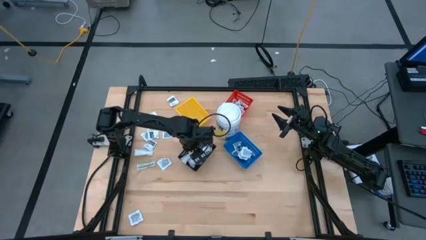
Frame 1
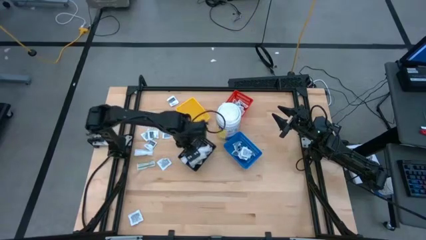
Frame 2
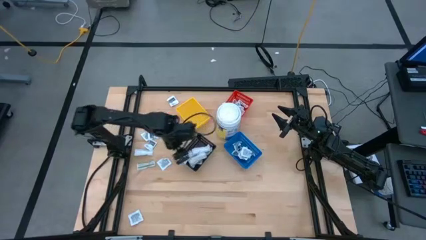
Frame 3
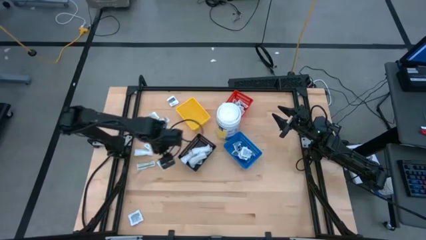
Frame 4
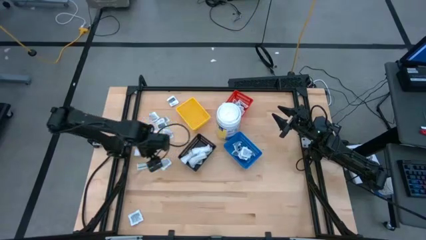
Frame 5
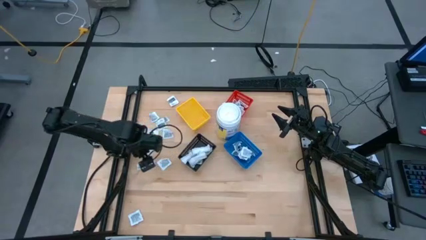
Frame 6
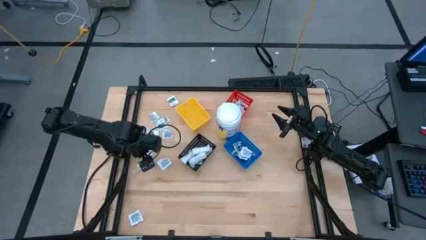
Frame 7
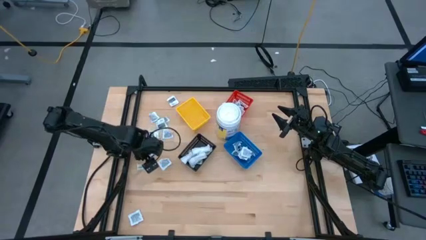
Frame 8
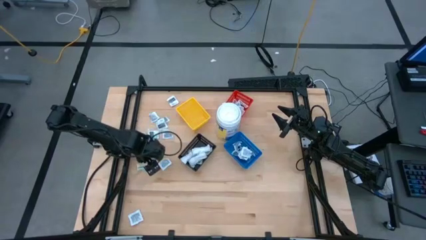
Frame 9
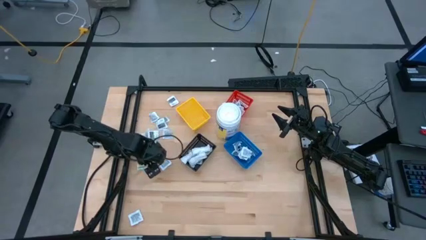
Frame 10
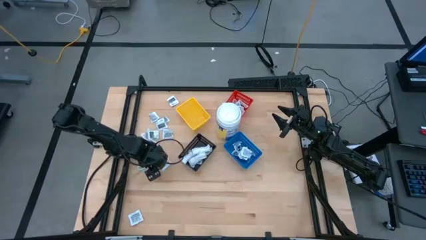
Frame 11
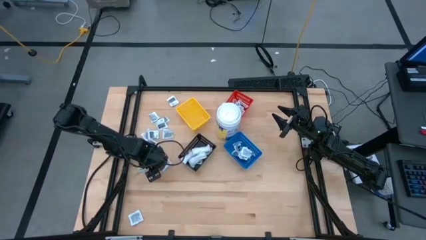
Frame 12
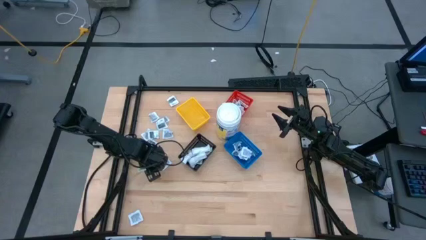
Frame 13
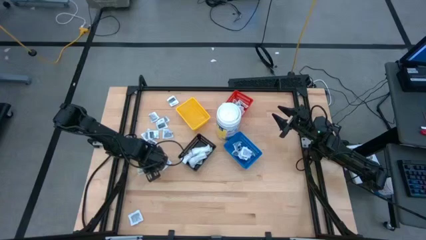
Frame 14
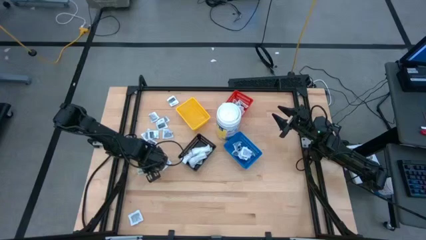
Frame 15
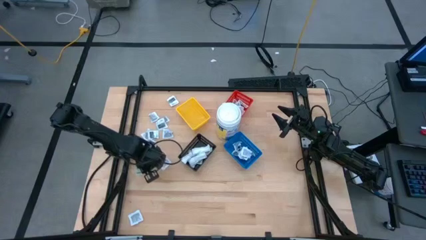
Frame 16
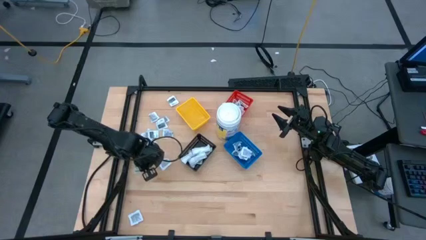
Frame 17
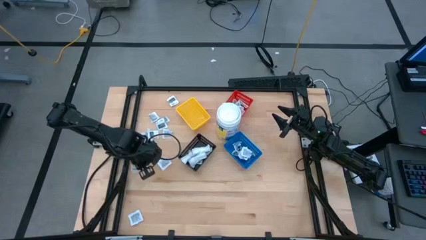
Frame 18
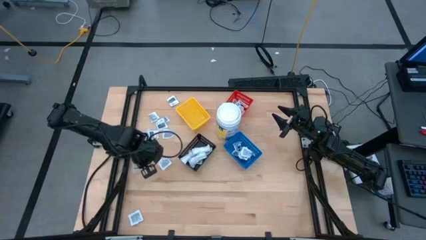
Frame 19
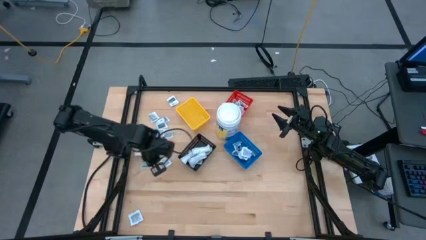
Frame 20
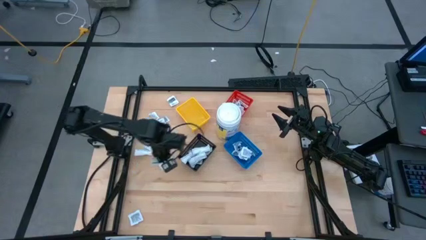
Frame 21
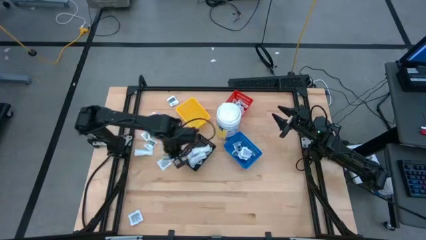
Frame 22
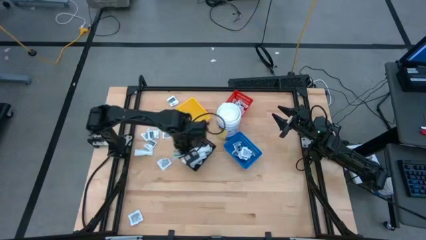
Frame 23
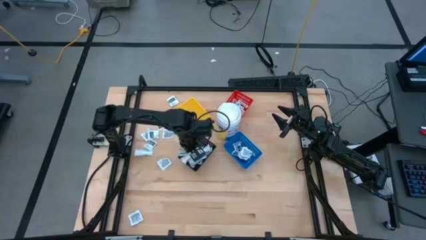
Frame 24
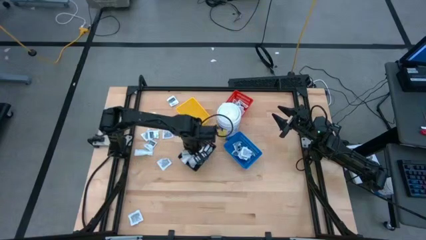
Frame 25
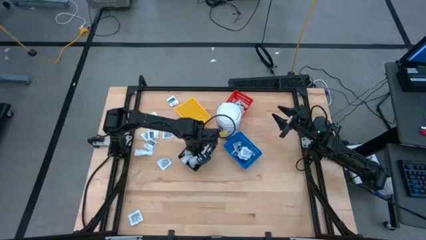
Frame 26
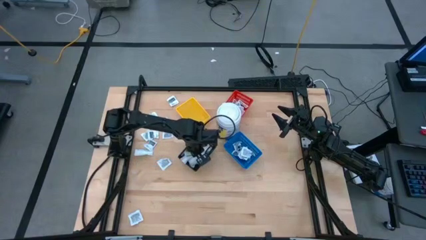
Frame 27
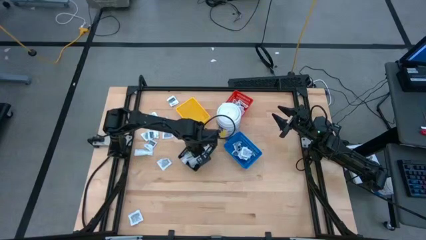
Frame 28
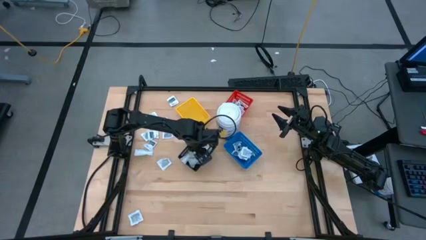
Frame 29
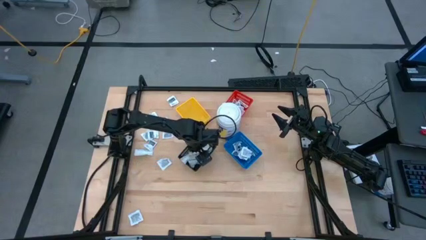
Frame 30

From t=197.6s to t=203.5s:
Task: Pick & Place First Aid Supplies
Put the bandage pack into the black bin

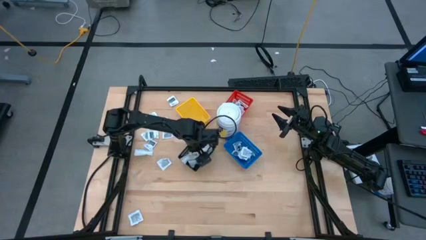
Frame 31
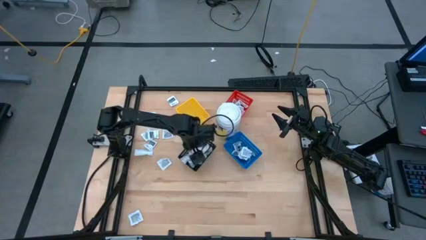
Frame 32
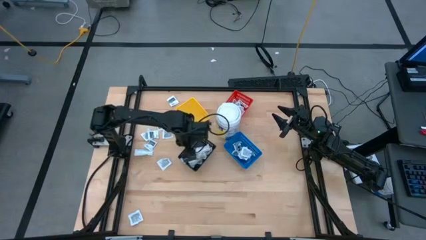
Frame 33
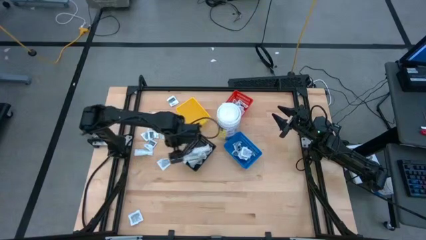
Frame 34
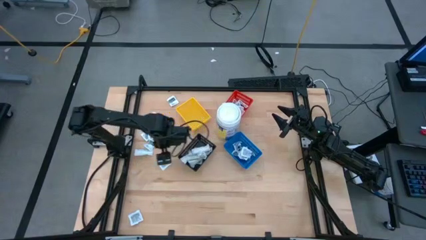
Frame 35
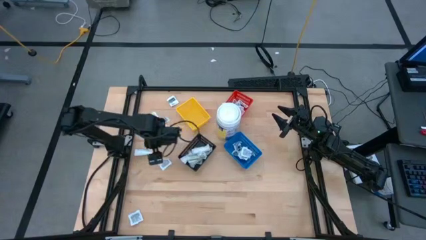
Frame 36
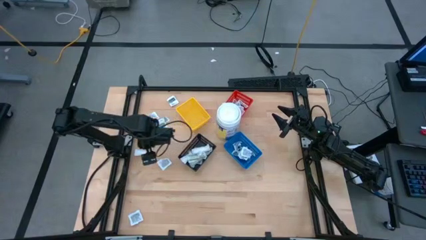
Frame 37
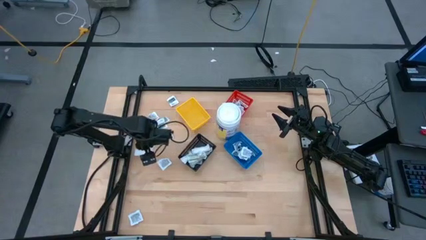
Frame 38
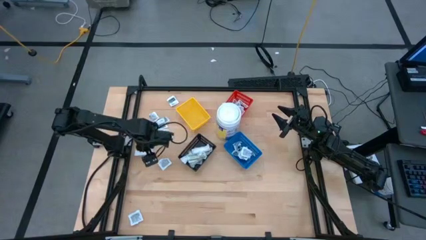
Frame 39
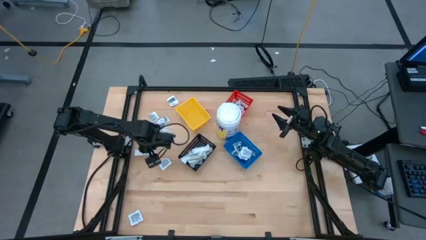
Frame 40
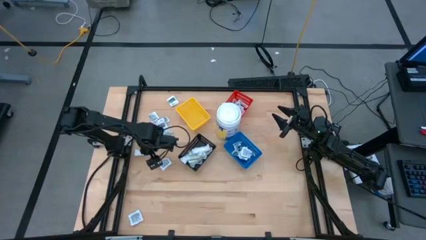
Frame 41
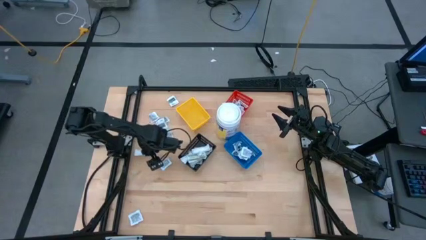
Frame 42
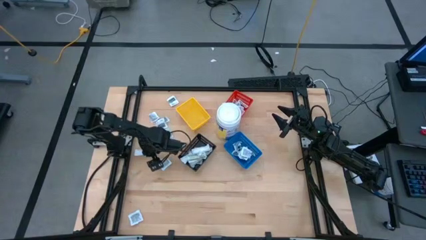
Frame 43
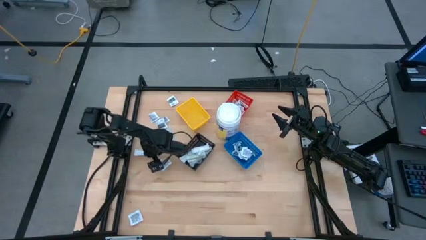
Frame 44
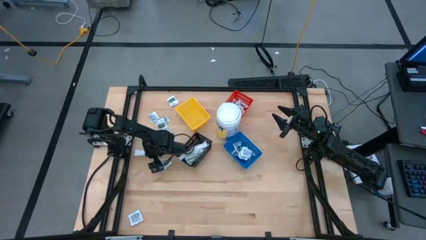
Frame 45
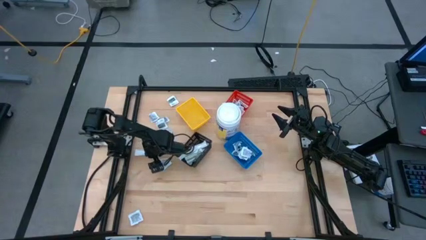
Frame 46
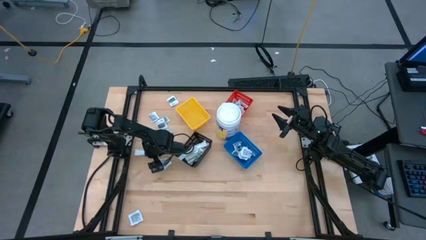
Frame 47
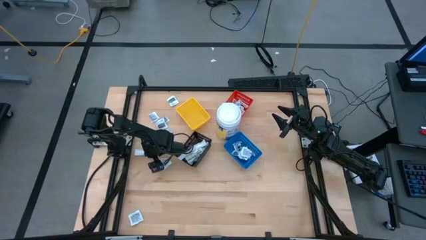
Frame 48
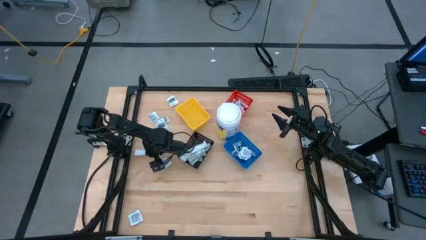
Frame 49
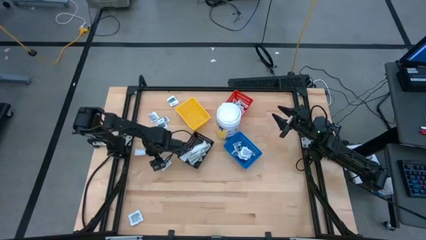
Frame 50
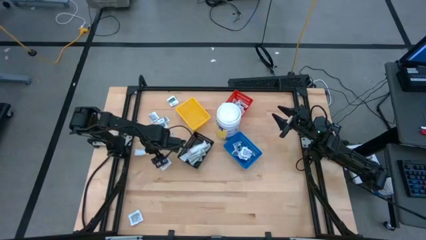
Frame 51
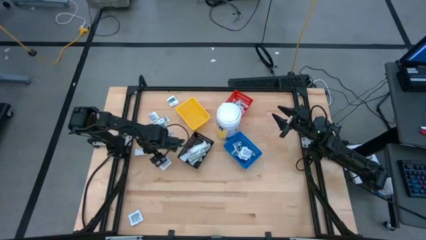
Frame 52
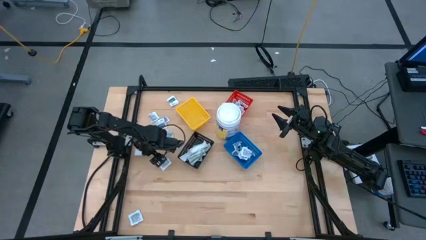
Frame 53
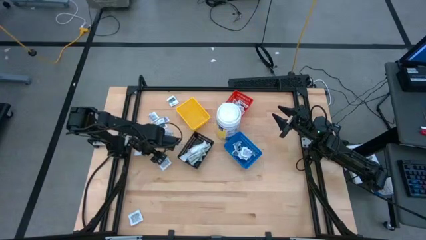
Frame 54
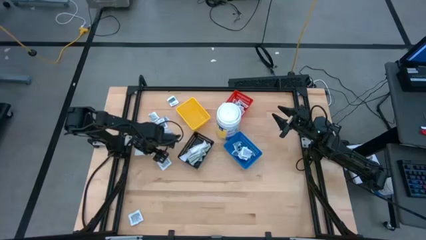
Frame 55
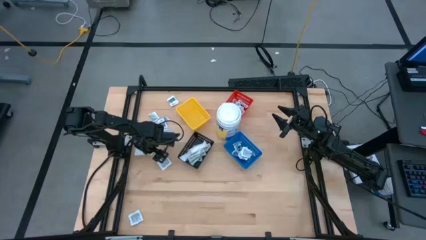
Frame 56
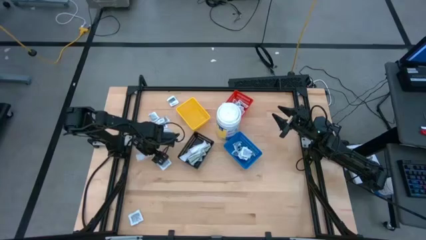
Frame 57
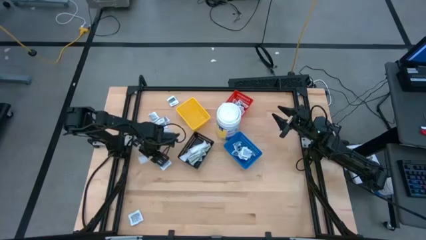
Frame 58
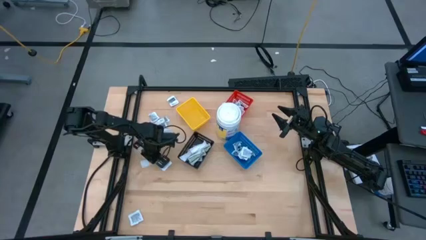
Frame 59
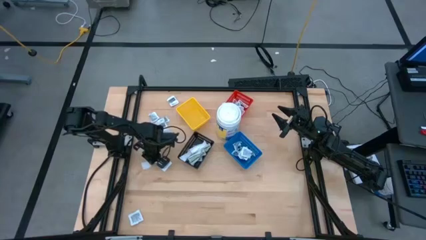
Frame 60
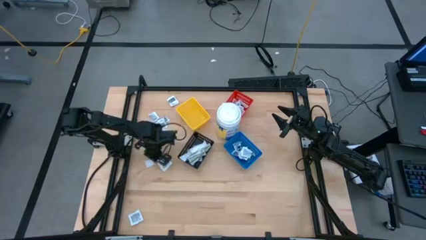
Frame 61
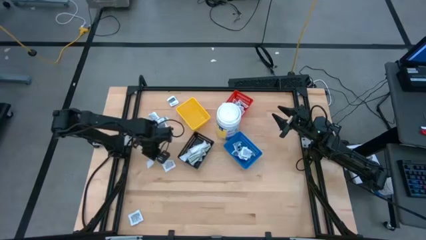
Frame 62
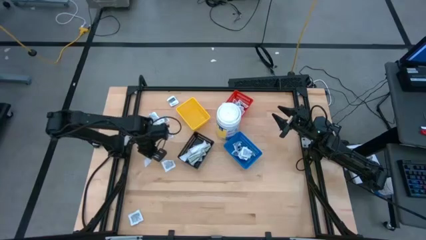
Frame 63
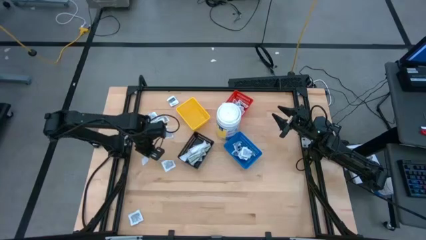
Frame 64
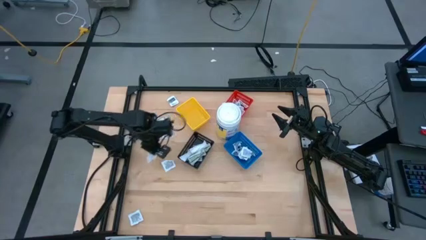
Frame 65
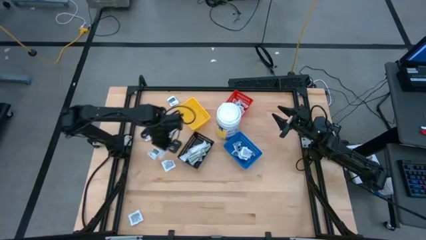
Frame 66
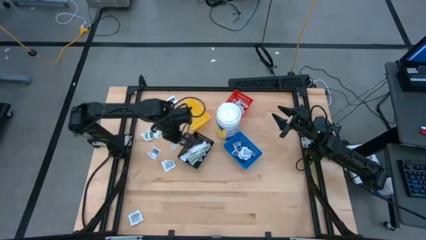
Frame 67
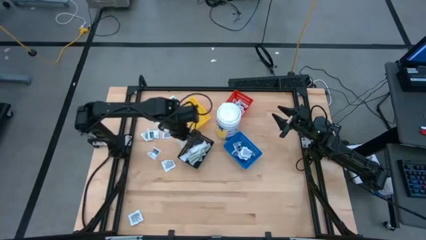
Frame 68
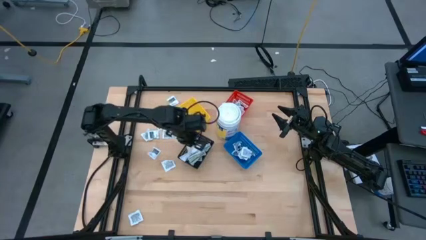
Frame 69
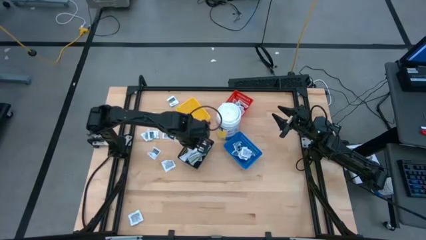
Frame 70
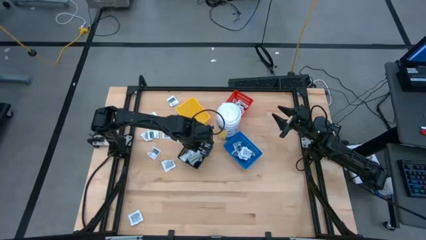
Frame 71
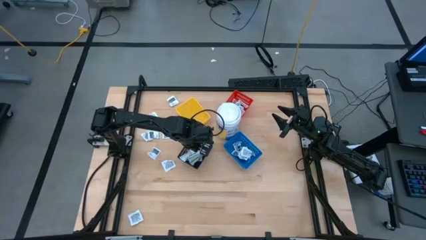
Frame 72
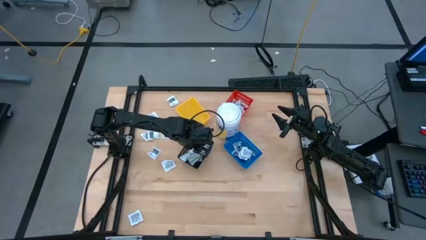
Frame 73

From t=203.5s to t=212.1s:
Put the bandage pack into the black bin
